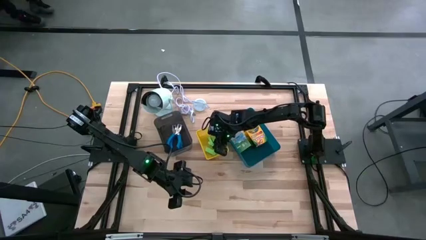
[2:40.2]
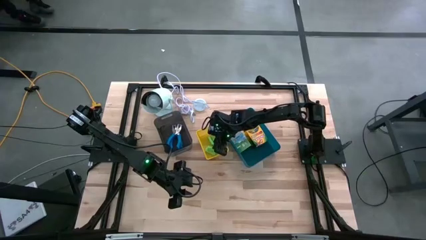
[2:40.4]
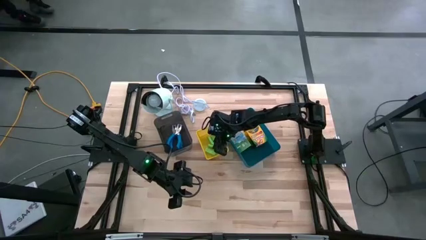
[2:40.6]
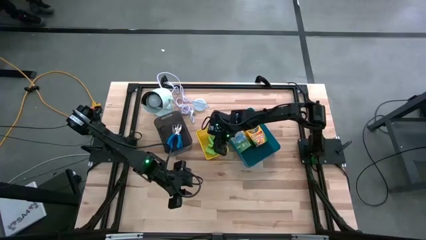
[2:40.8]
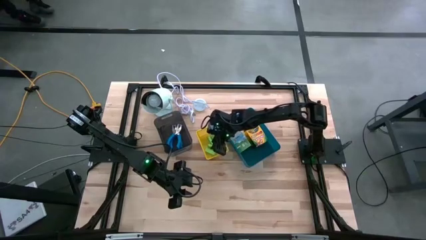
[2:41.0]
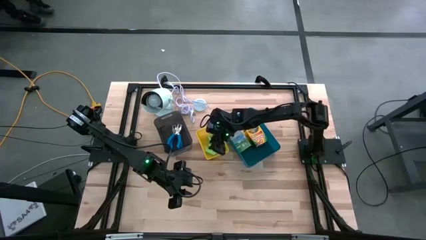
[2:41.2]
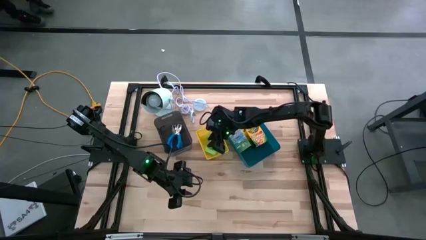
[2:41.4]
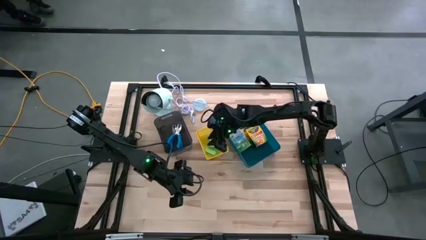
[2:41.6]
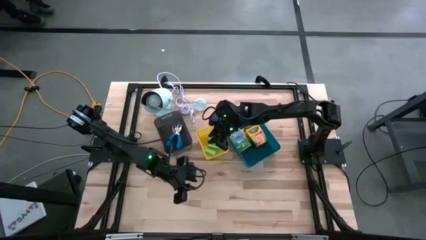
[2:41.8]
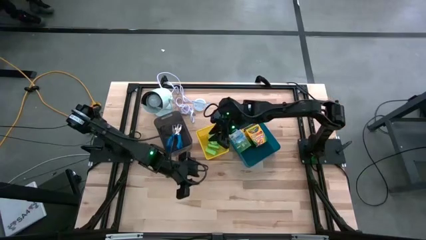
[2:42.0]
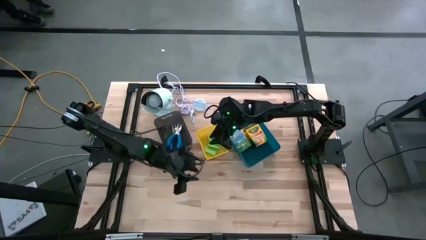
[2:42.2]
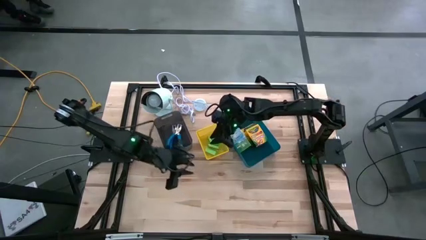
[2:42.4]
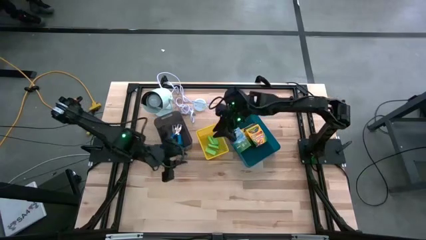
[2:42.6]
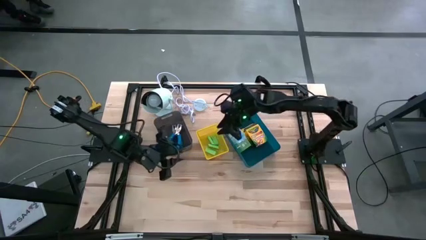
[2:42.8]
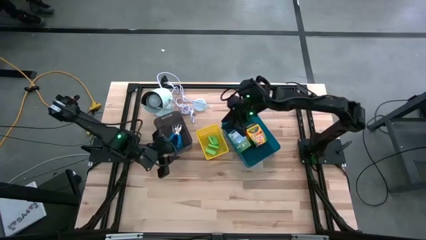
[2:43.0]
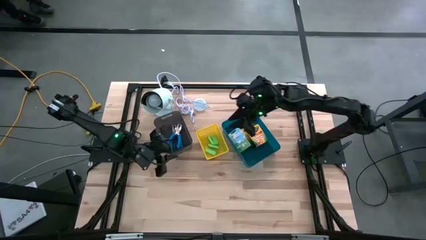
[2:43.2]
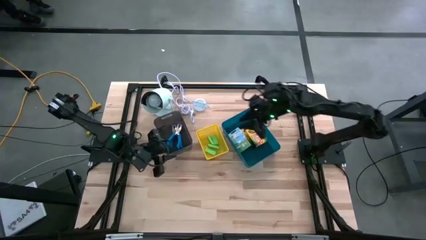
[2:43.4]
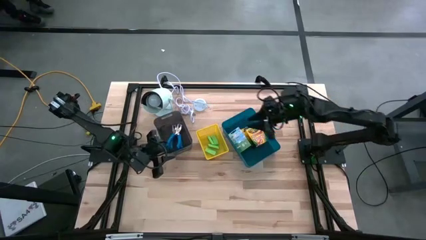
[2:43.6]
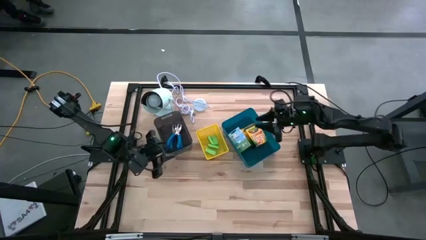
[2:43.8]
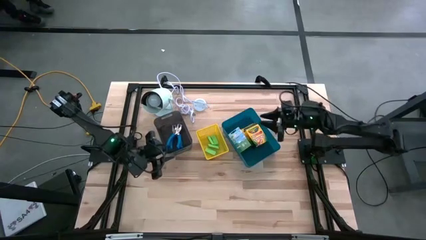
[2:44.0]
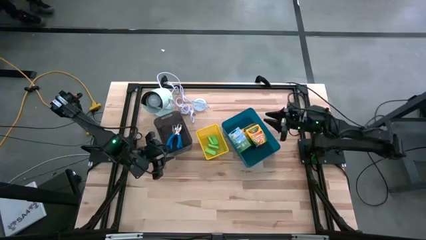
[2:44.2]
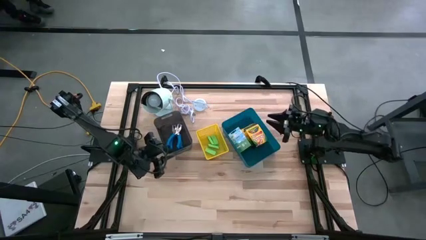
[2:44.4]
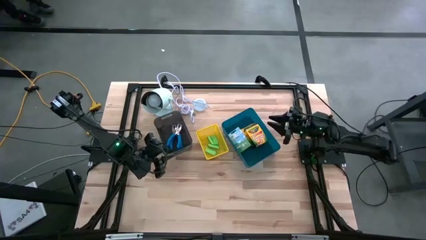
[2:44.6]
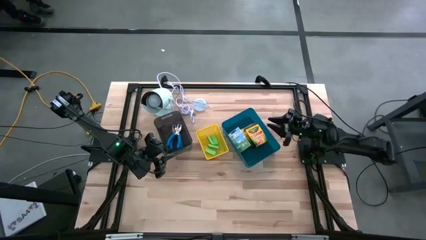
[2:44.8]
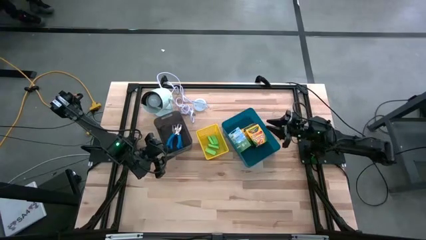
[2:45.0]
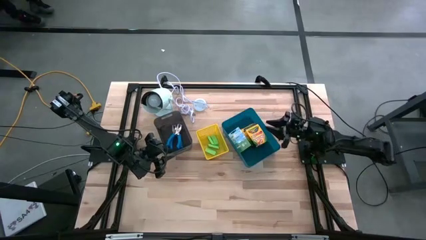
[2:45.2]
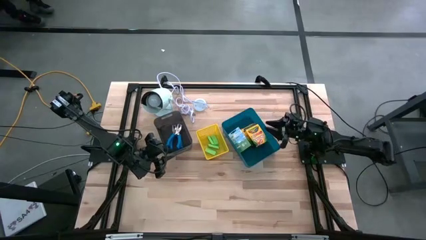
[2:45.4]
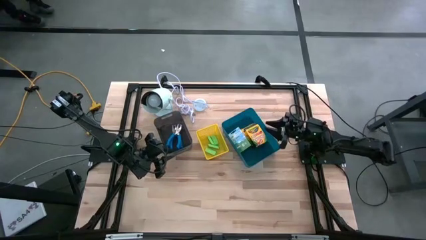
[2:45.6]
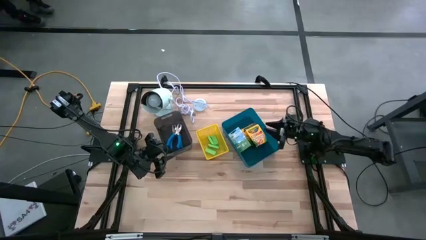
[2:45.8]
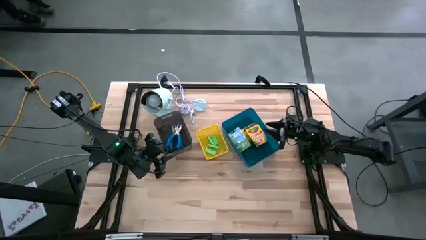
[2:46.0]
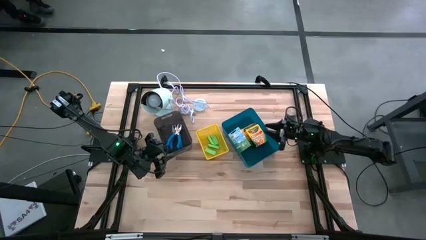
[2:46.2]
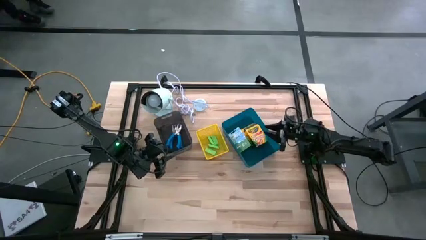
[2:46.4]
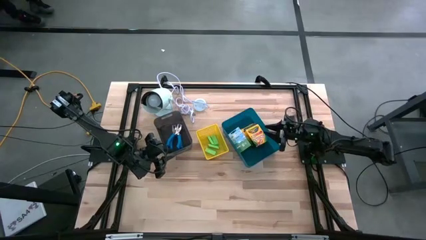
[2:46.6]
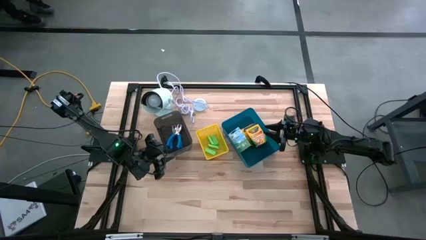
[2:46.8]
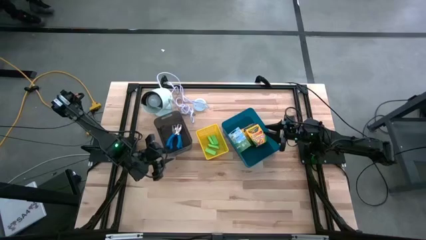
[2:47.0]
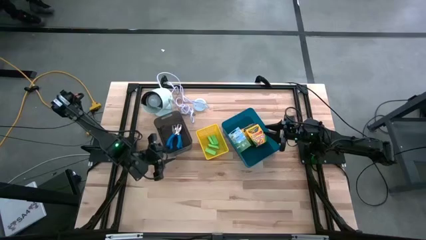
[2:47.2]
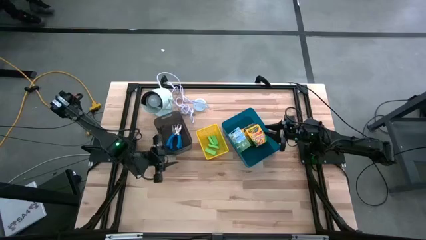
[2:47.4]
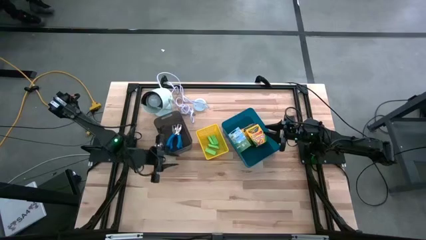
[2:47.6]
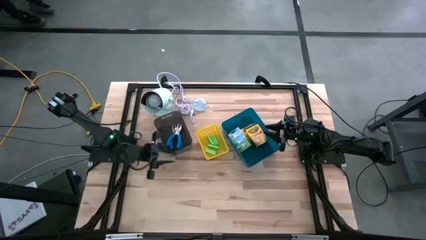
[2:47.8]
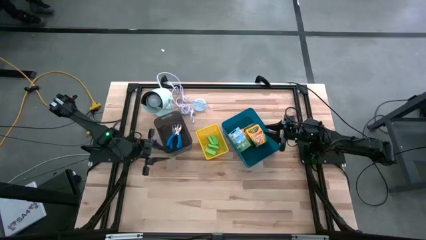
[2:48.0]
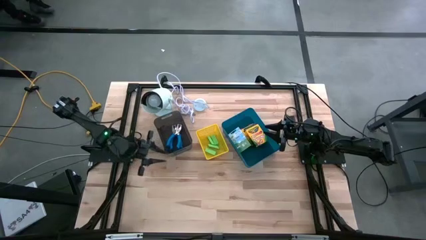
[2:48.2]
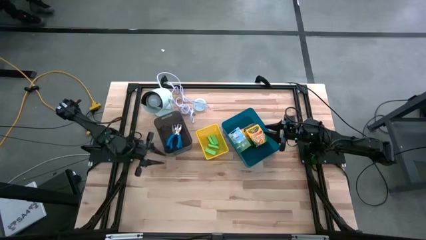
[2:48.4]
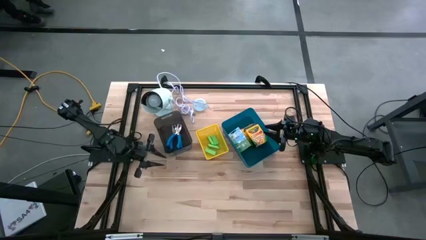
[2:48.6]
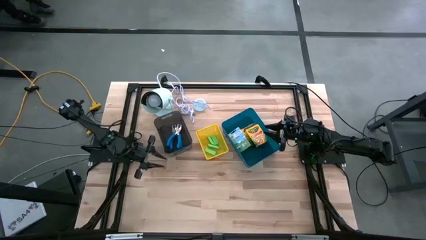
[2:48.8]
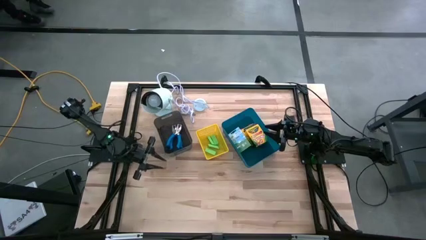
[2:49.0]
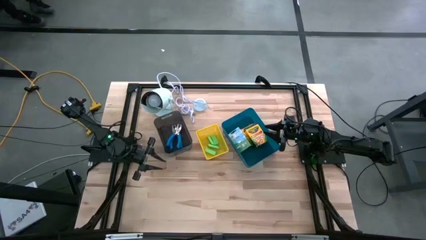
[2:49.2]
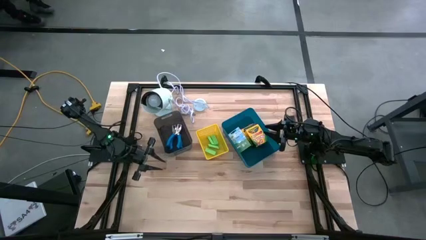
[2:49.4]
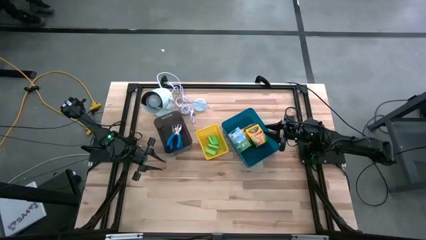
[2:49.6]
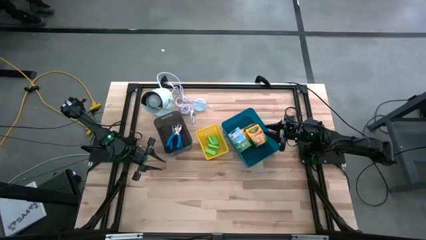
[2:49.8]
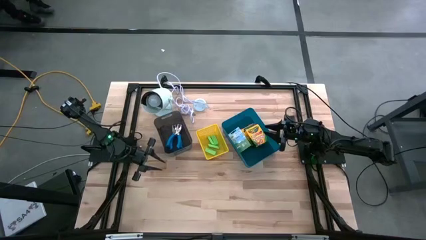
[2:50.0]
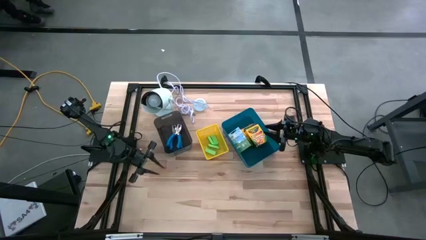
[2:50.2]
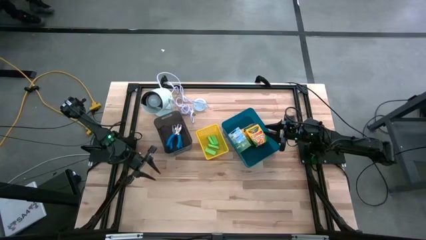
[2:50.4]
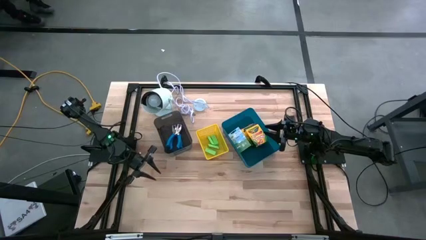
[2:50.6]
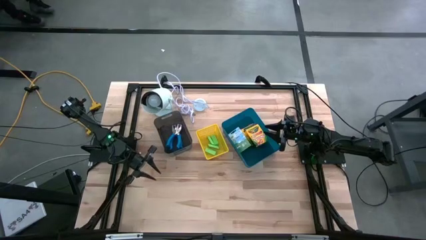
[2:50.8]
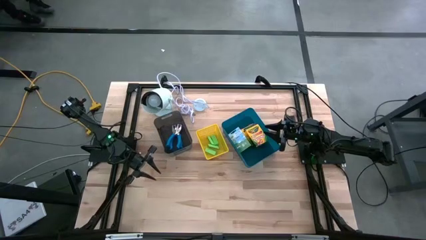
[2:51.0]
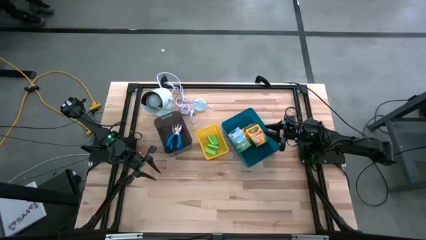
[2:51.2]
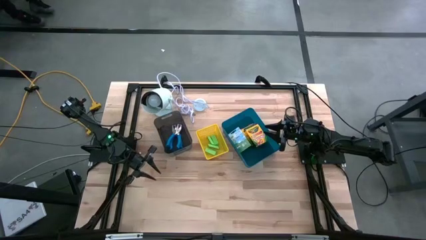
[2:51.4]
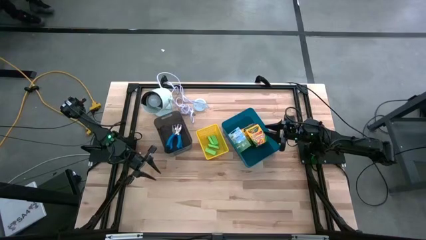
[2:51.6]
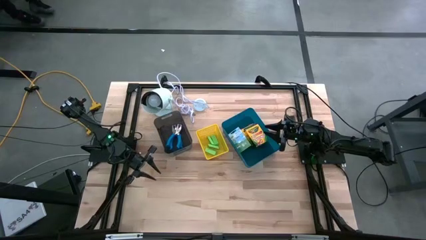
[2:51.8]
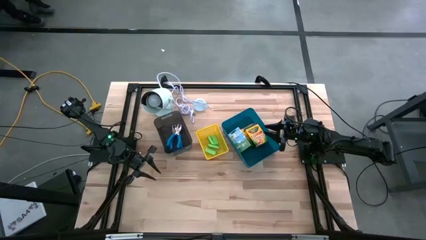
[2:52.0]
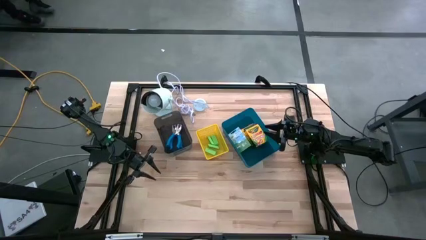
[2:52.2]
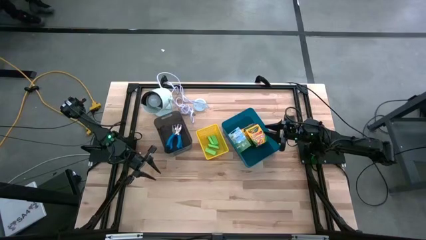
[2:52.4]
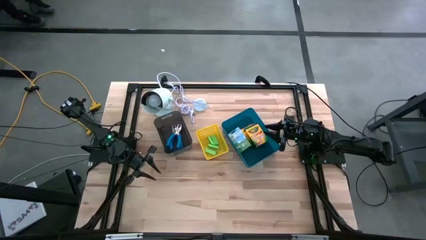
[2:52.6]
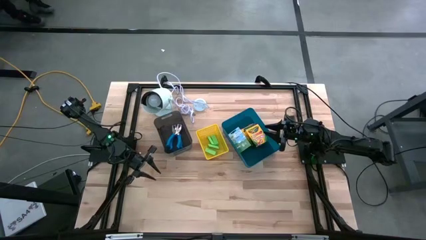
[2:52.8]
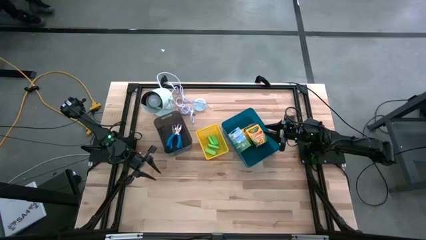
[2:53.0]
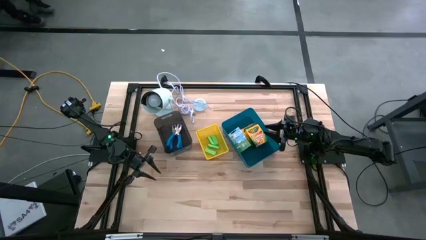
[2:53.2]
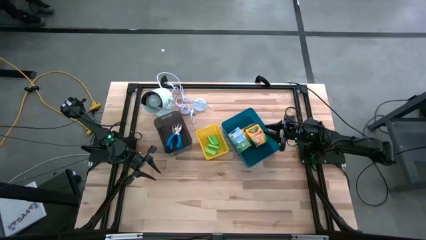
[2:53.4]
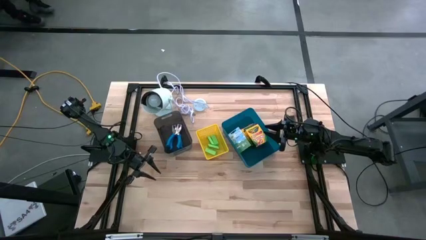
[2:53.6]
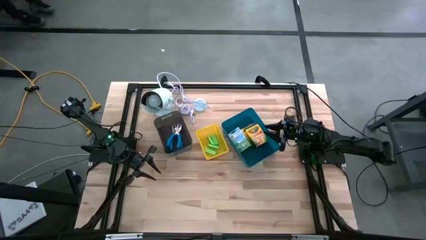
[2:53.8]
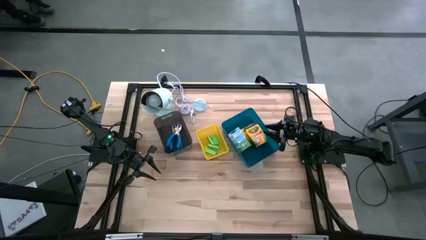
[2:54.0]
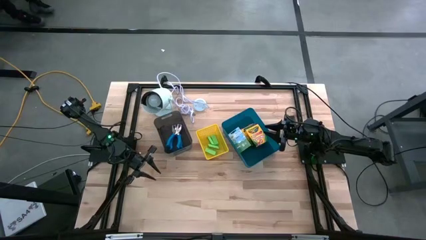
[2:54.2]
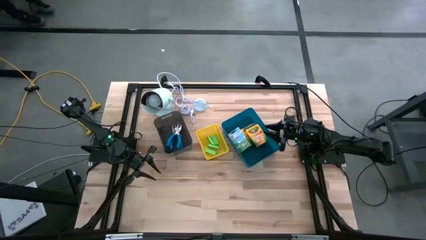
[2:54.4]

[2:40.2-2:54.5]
Task: Pick & Place School Supplies
Return to Home Position
